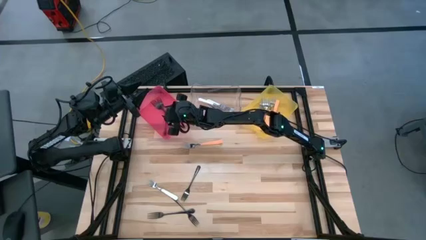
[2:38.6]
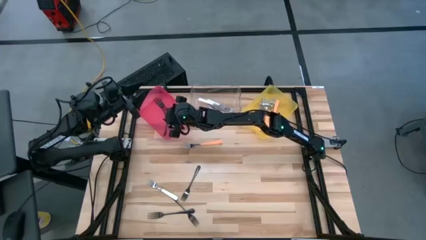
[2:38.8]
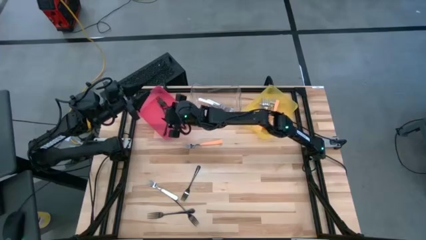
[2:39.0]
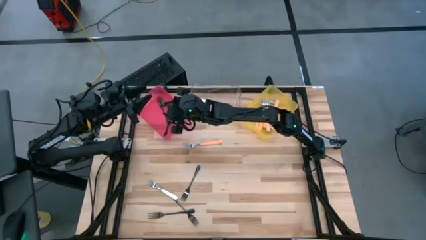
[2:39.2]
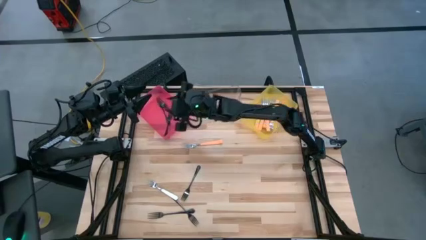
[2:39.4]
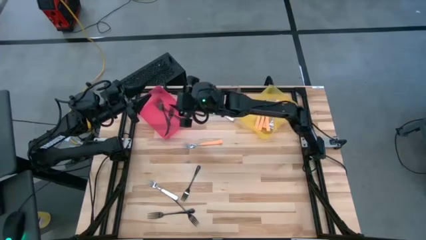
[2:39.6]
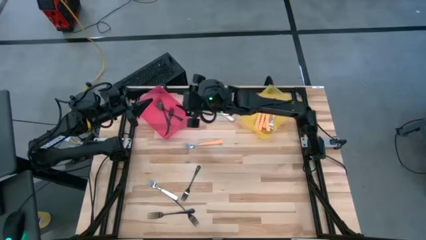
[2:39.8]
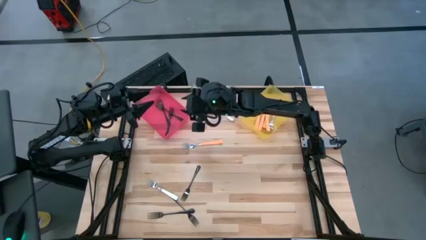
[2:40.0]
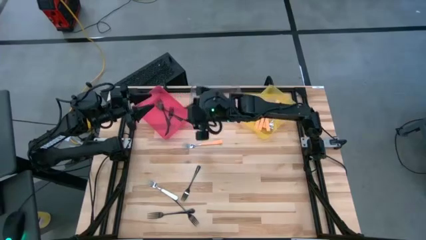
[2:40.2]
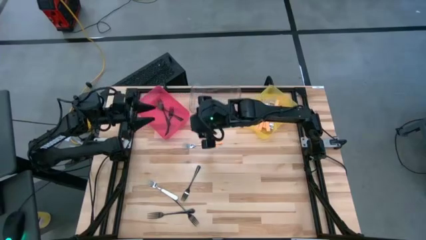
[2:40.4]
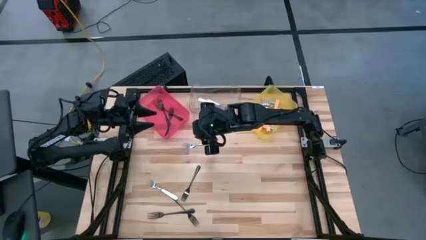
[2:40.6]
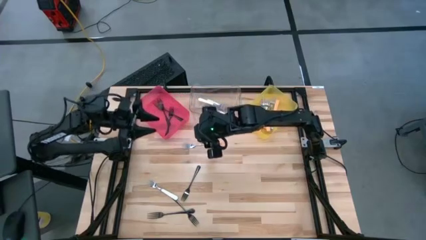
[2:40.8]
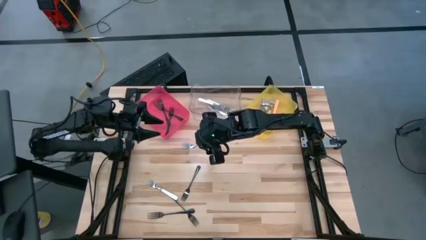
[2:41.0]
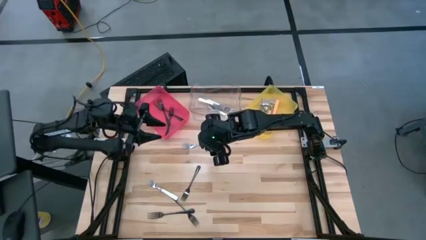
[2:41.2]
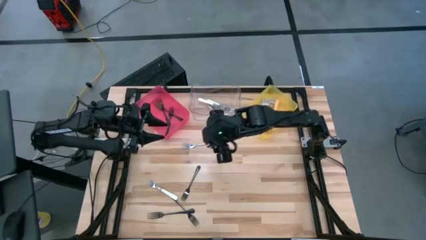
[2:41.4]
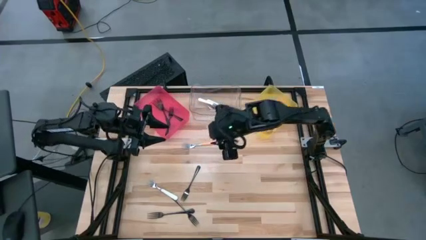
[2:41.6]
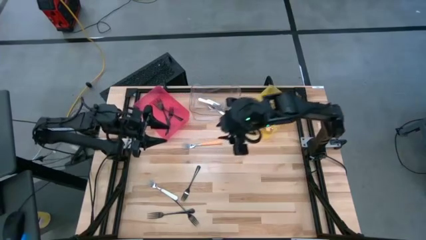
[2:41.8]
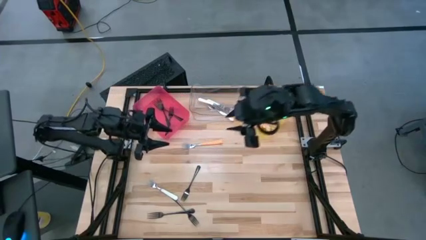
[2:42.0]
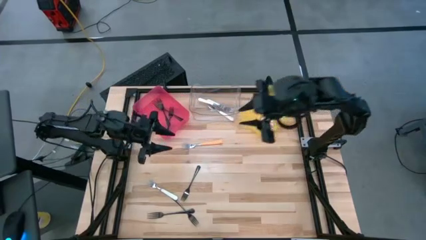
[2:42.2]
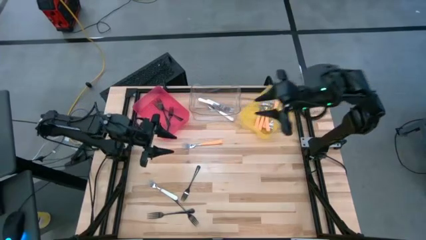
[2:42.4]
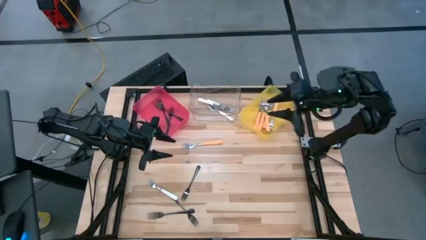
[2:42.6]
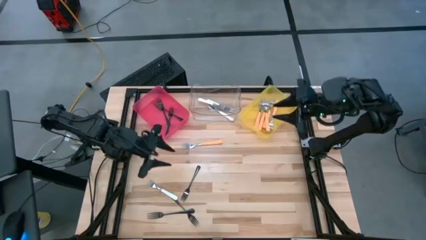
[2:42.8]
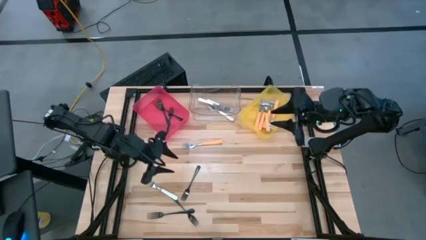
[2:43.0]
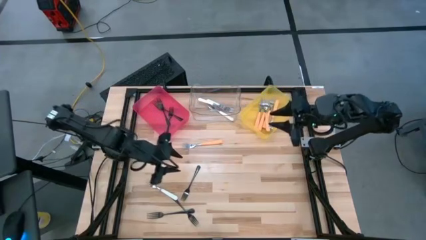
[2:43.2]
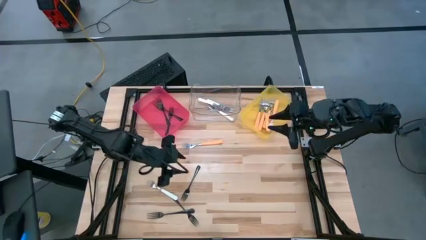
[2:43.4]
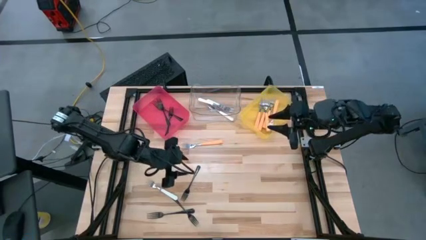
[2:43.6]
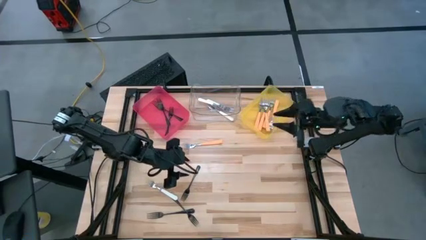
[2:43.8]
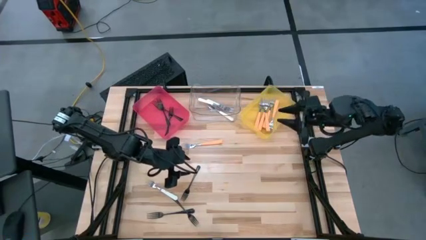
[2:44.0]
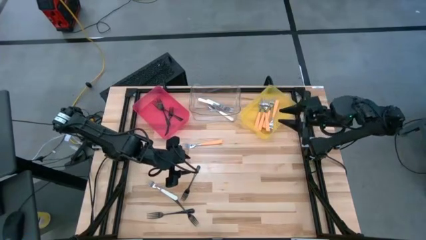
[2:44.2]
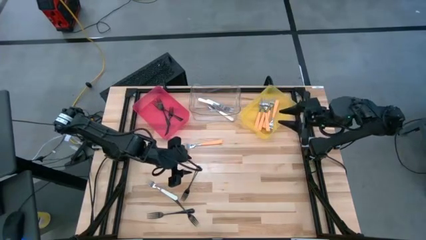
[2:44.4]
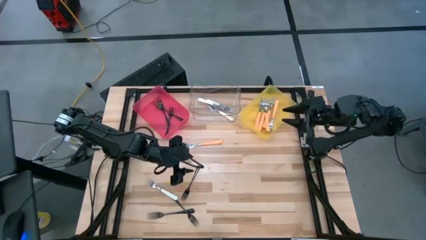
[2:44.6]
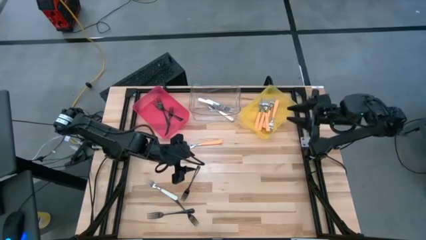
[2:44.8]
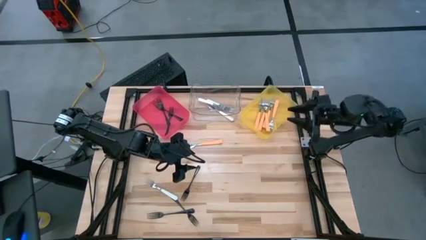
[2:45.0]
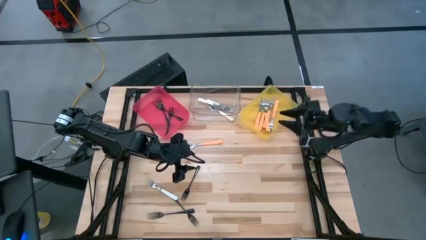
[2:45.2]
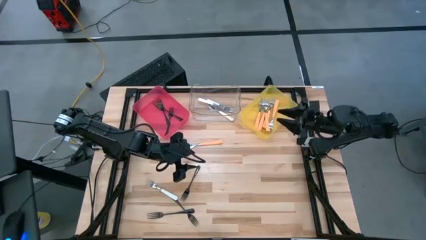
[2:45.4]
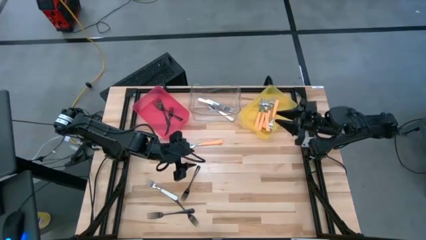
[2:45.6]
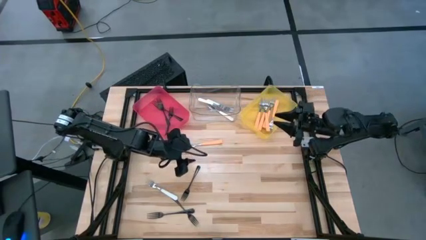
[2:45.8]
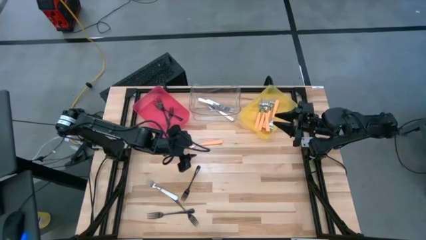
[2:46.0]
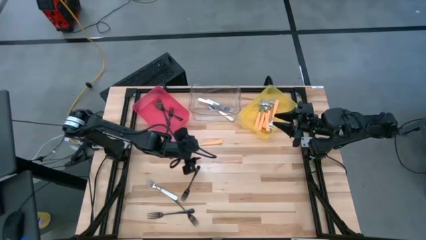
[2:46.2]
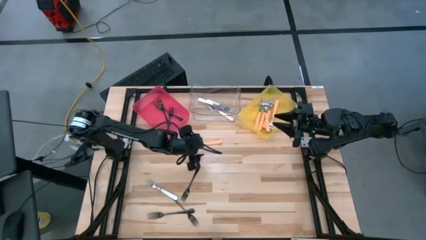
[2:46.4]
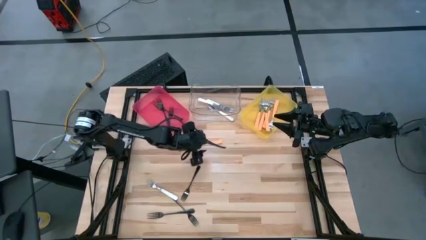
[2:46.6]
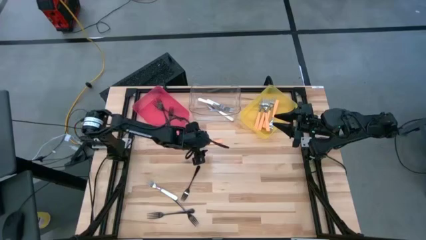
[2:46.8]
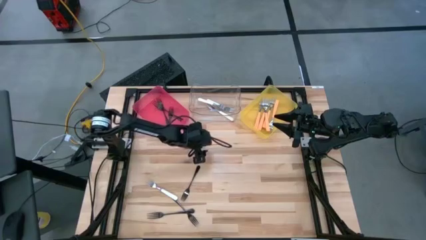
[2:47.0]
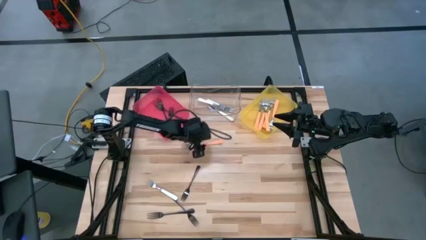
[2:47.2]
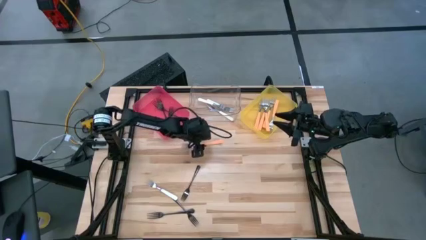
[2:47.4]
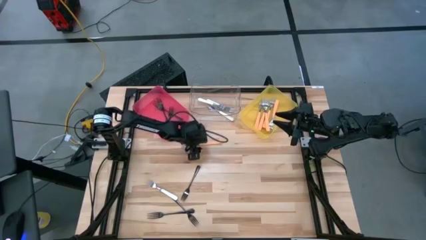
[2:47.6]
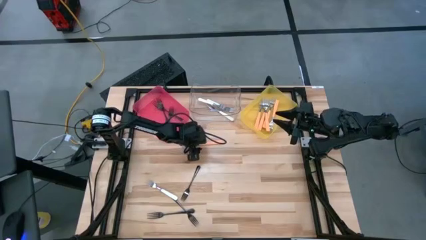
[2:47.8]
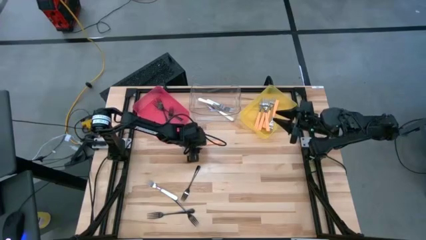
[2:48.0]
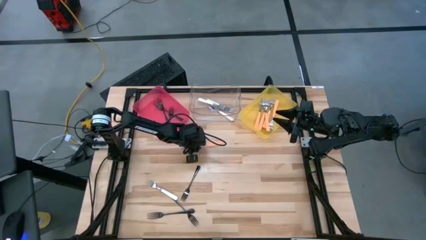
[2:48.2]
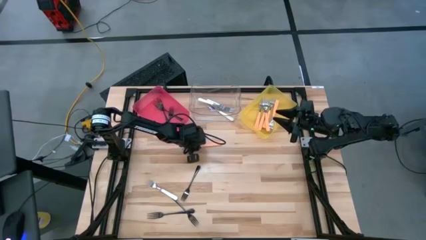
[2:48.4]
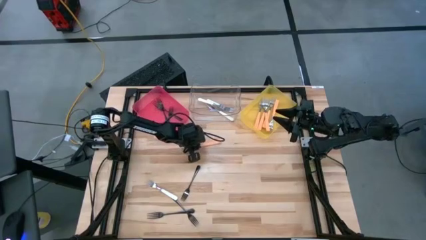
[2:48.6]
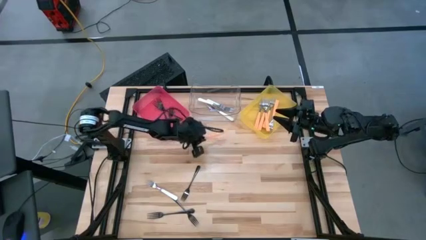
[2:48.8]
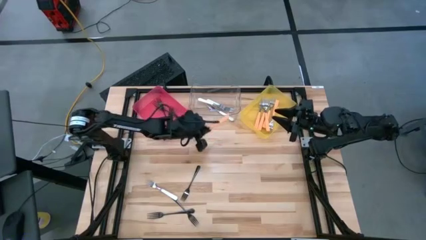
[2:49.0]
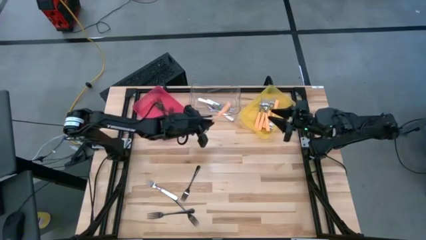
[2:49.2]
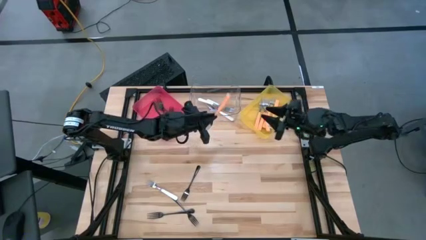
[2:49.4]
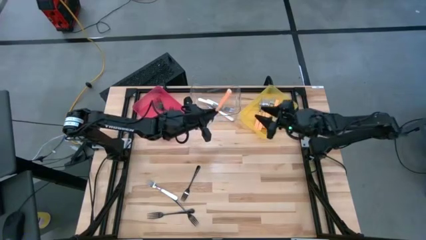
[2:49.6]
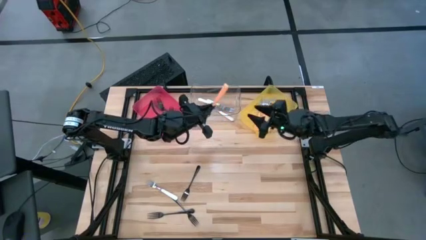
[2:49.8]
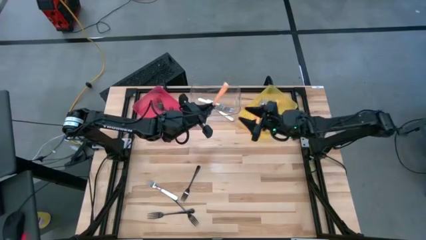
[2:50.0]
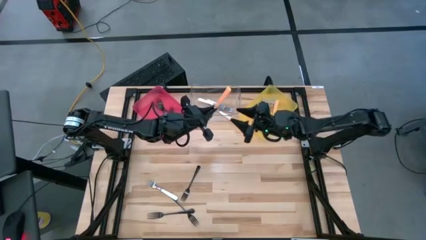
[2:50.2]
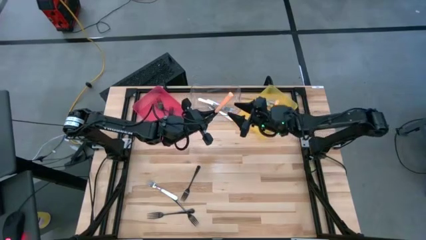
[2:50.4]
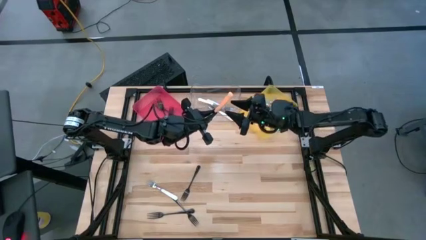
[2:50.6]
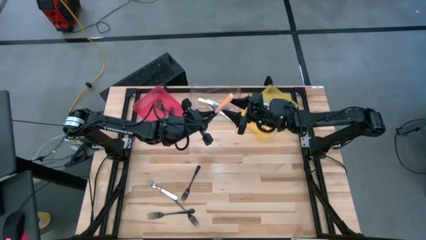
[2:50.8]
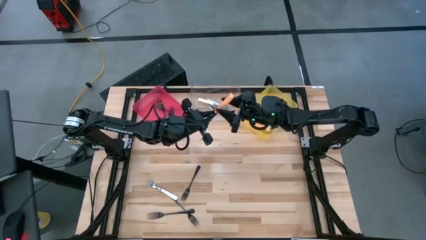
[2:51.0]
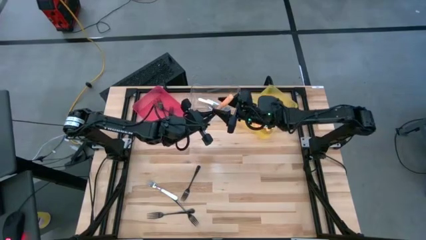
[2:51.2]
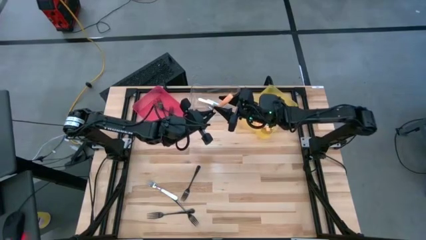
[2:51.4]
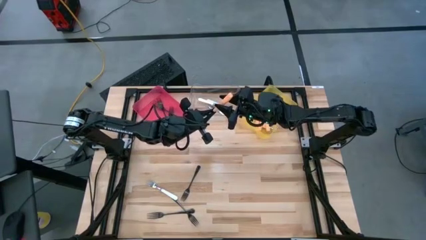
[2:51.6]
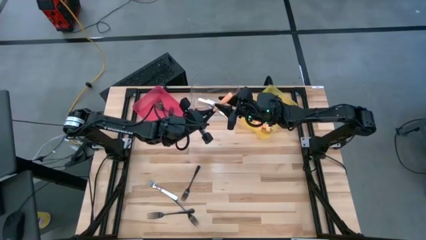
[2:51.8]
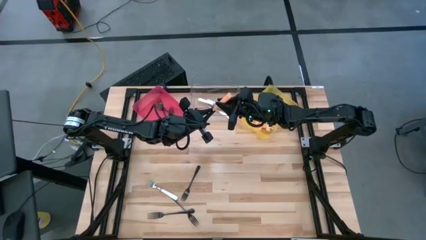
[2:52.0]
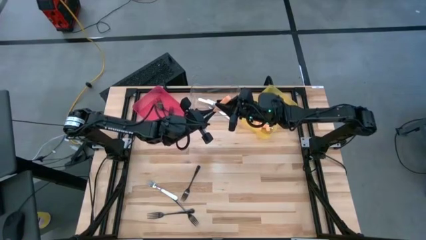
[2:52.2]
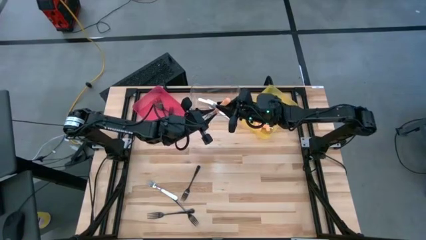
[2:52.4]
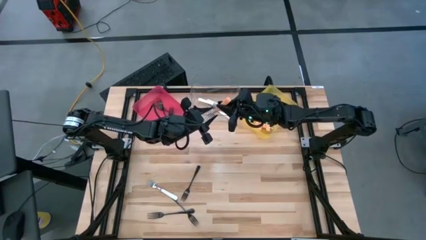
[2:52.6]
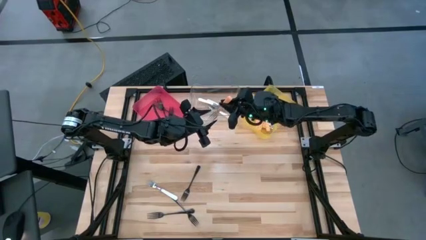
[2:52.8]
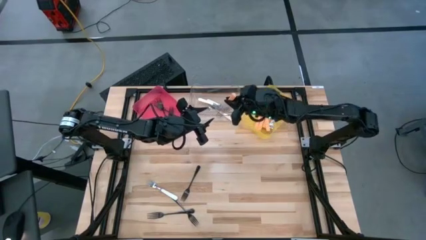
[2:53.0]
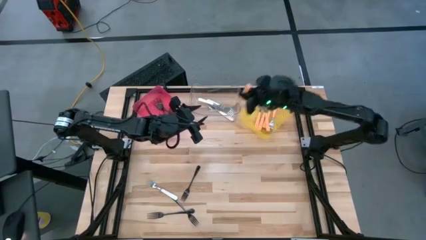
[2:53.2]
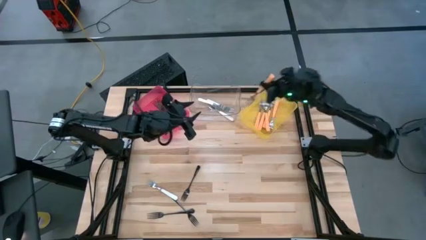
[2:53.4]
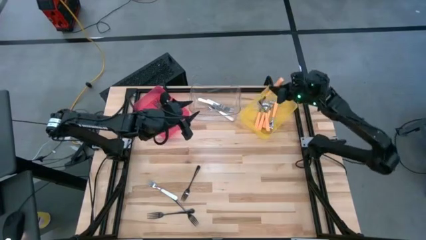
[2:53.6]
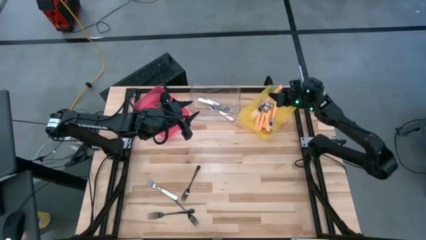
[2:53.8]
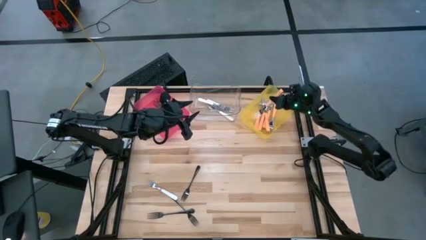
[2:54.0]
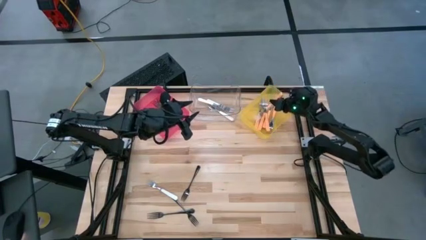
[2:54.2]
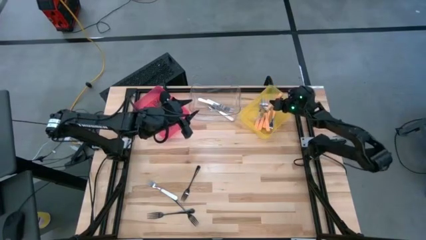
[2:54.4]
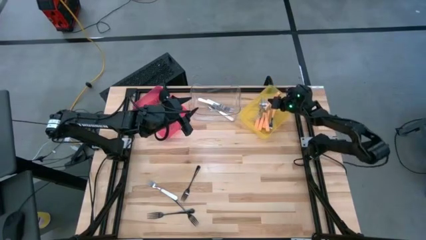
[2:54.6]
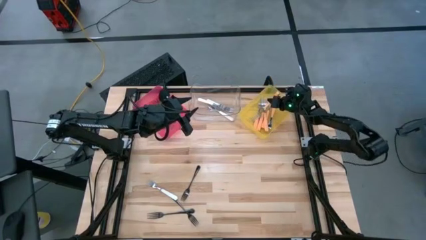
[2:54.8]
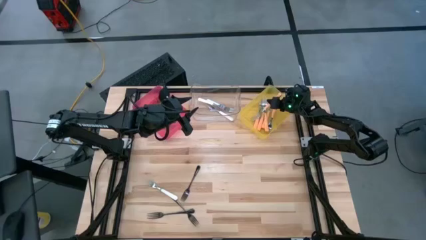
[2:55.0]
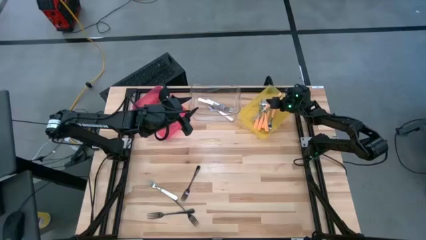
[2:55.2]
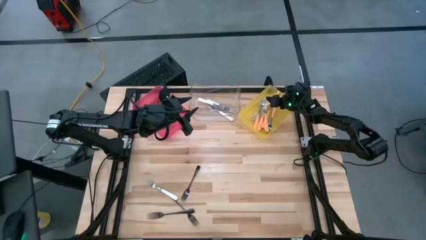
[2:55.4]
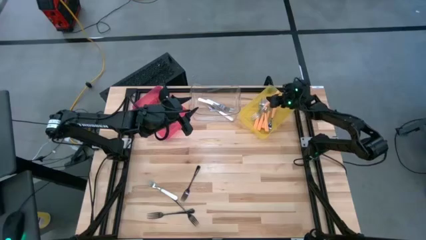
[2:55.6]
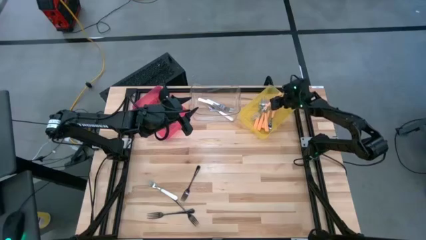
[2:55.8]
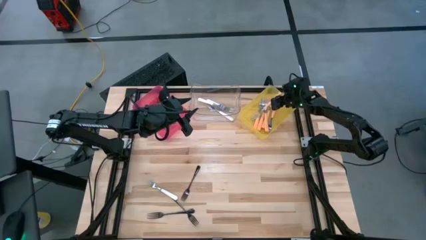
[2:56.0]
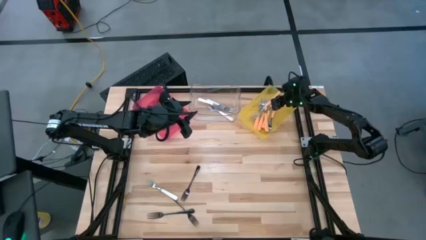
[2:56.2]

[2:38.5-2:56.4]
Task: Sort silverware by color (type)
Put the orange fork into the yellow bin
